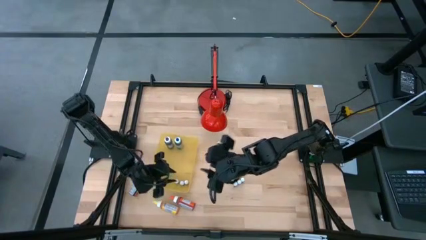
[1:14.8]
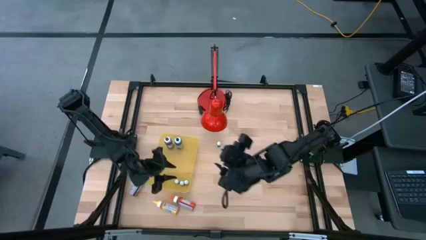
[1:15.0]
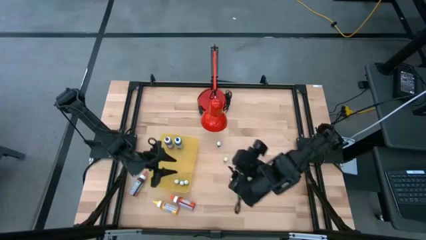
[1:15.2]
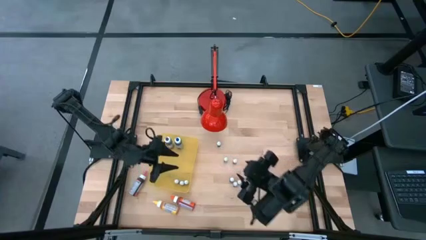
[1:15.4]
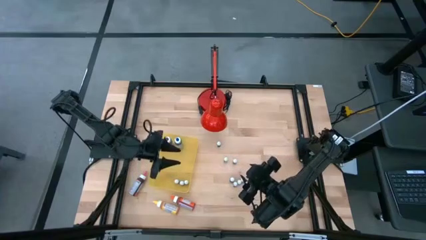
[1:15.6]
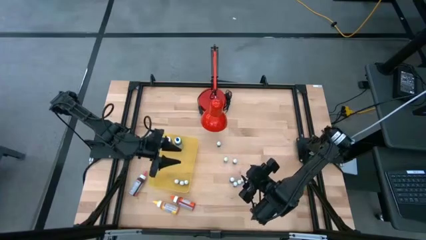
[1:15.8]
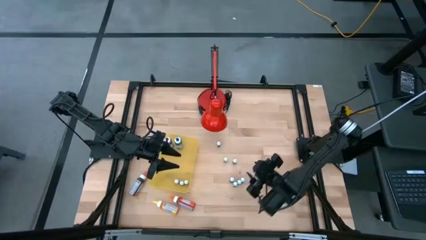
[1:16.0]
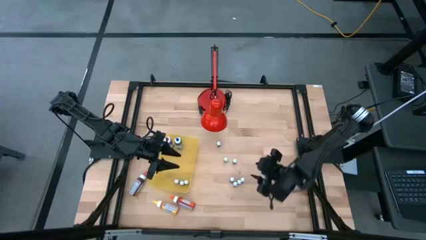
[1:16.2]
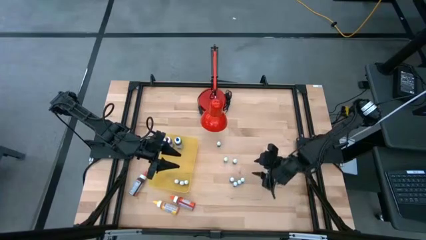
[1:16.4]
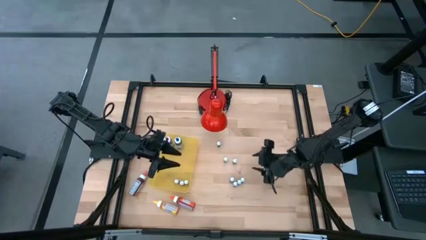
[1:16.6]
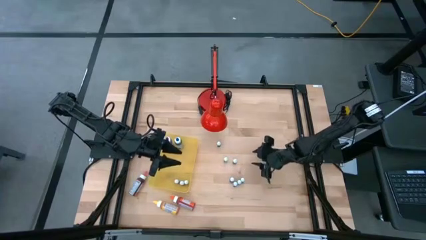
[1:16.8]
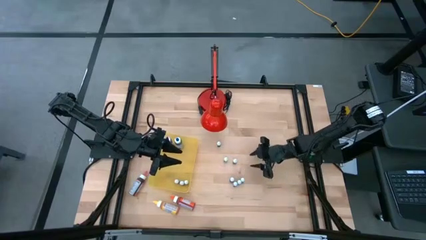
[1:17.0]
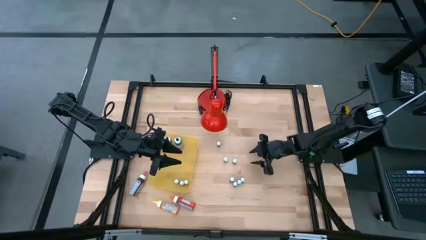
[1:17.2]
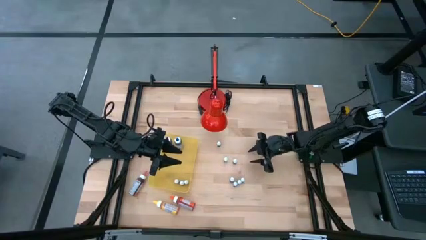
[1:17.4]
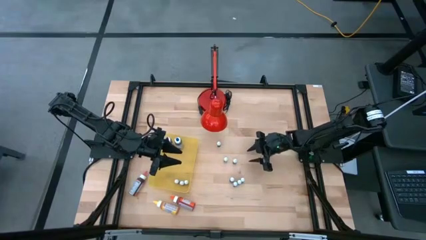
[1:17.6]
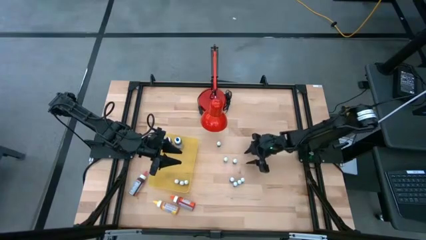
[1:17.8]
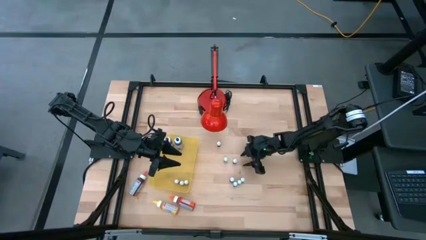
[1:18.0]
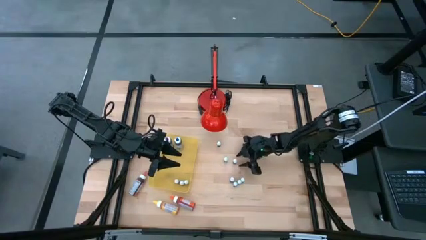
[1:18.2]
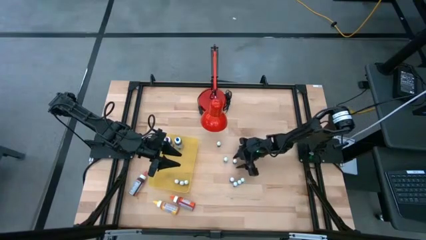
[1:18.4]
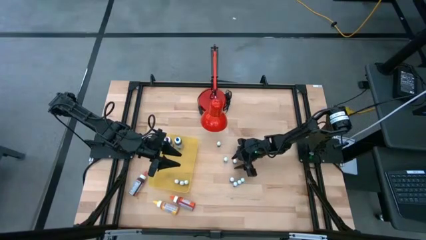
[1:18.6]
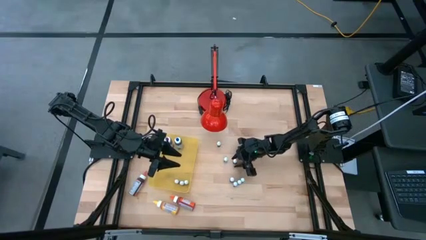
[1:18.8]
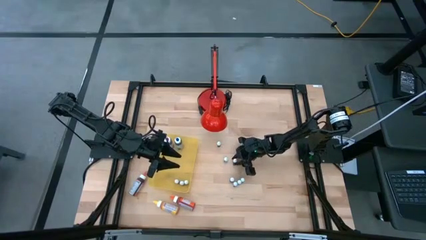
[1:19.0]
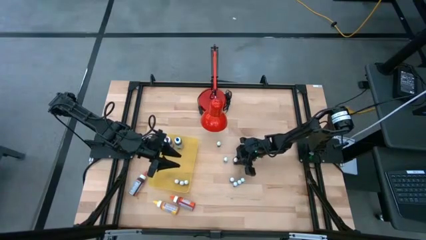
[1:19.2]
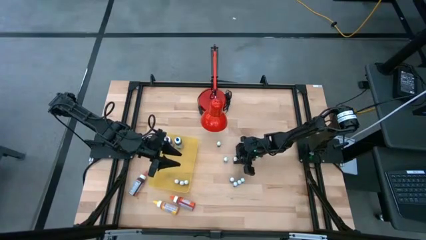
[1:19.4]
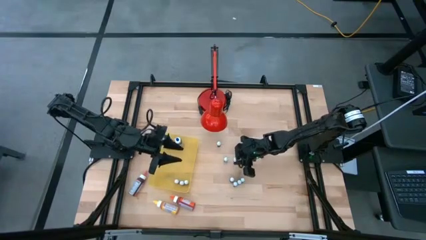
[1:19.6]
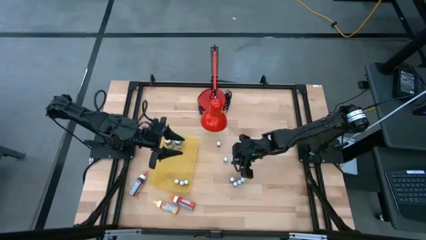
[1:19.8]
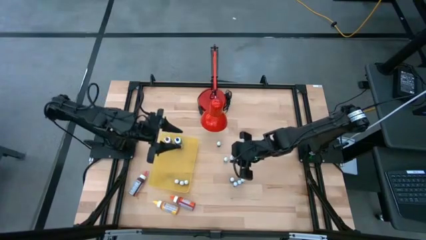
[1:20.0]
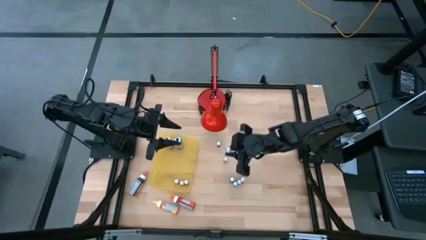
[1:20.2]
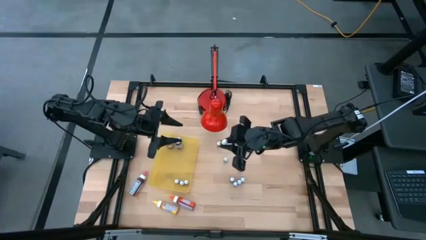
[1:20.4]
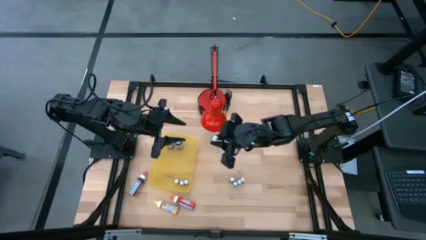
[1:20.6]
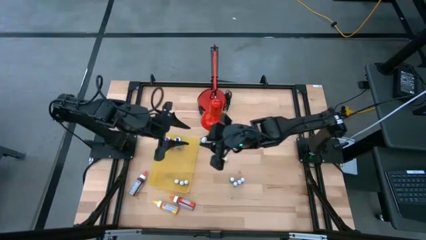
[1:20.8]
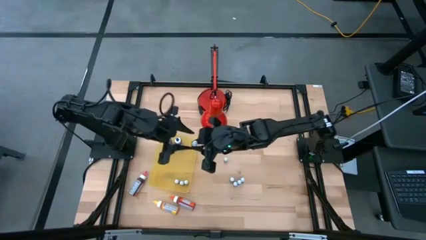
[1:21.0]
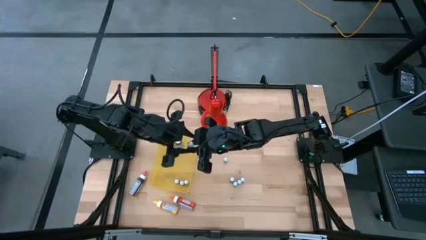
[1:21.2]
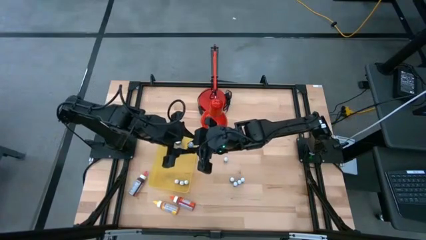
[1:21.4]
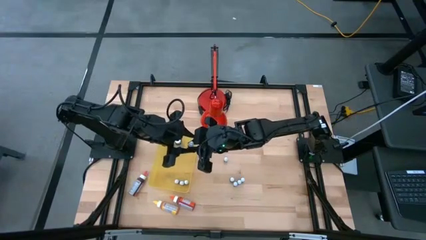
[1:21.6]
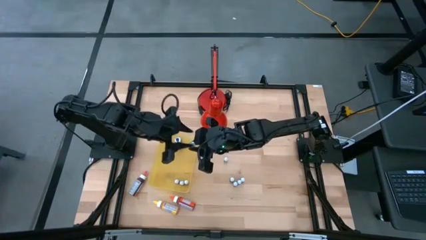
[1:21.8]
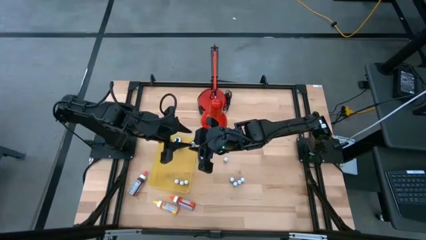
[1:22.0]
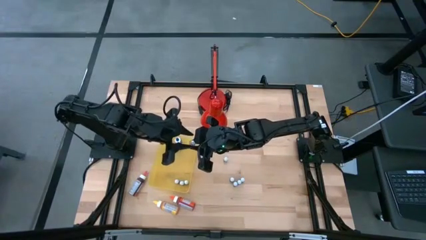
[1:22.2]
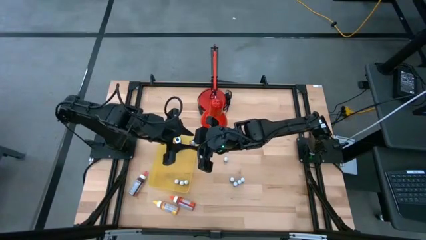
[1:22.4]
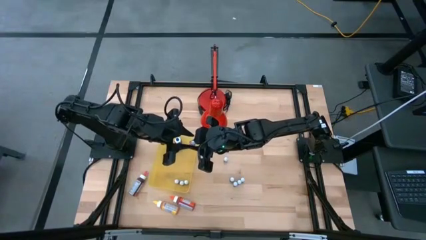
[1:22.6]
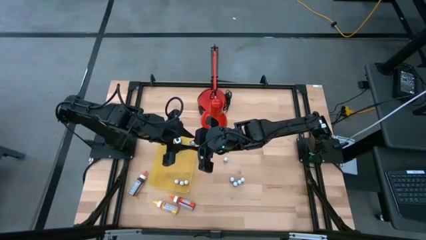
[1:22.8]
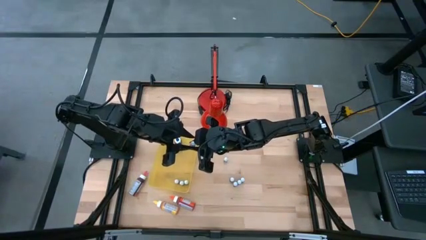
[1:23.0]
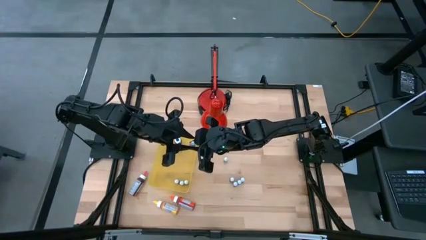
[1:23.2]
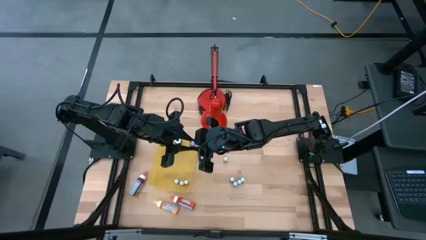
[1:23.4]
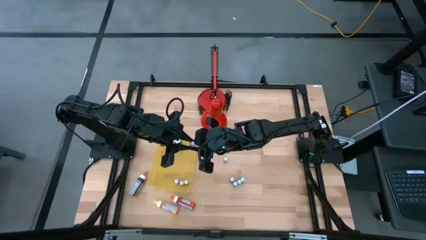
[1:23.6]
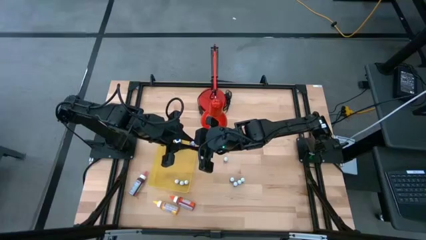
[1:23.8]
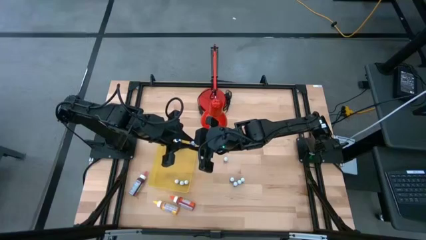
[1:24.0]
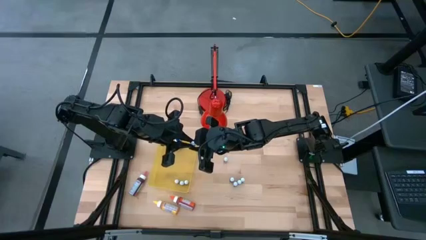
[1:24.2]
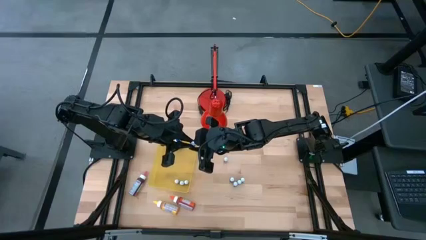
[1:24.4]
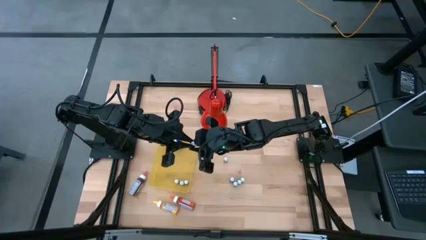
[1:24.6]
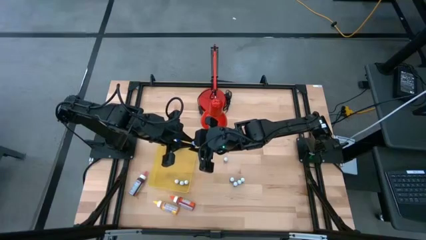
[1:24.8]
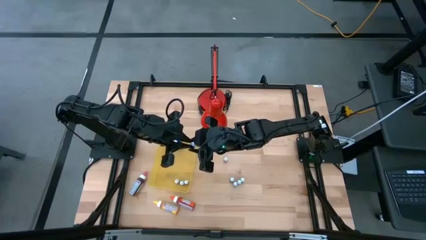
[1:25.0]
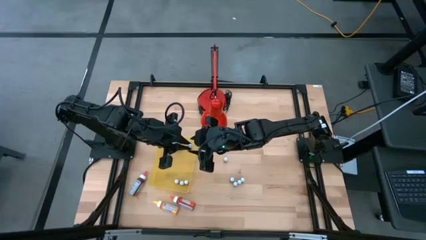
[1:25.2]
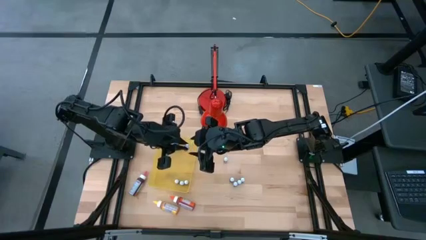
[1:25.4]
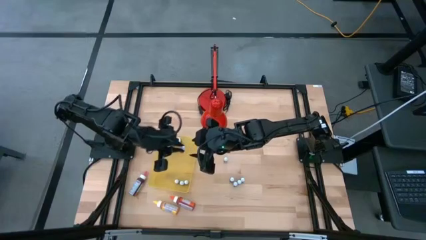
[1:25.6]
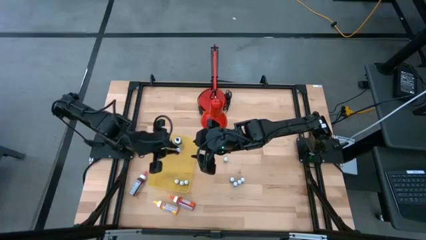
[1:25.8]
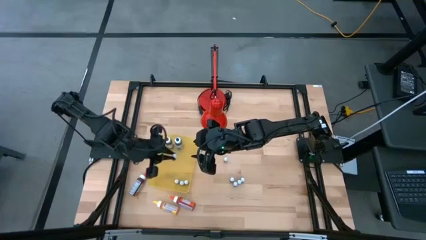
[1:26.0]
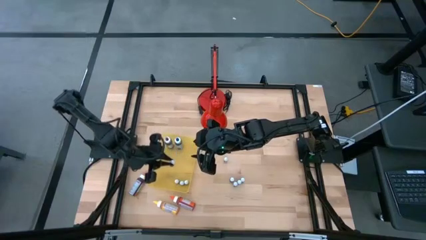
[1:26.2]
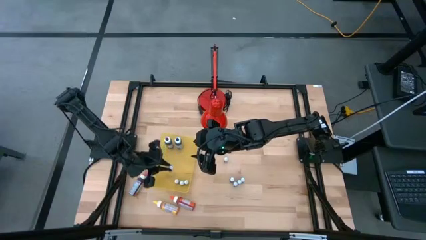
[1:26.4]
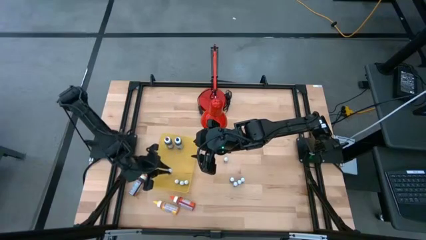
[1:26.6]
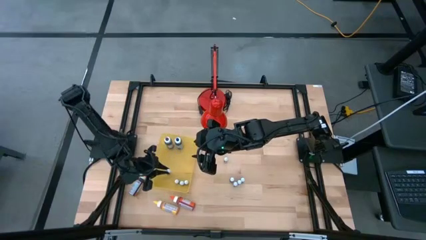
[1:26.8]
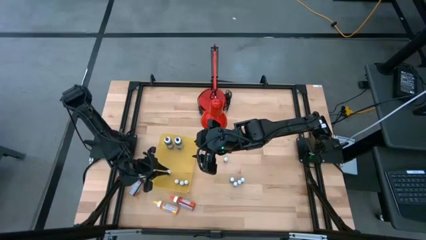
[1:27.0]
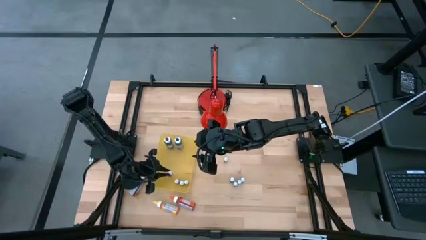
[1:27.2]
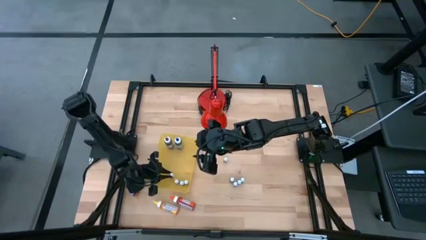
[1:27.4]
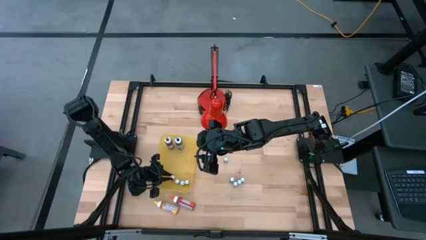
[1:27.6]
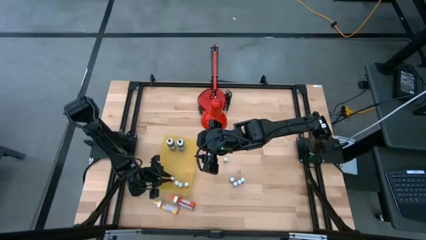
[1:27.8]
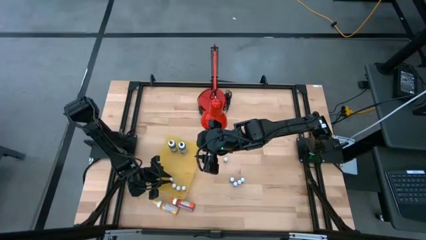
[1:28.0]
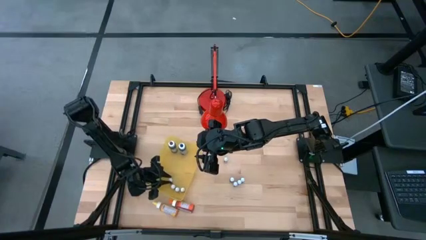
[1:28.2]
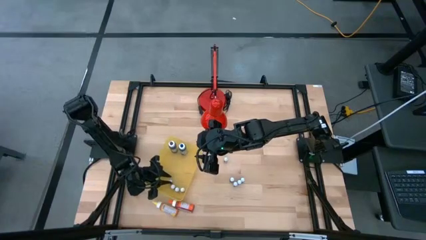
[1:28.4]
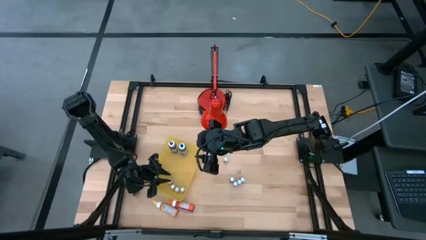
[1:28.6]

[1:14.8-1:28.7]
Task: Pick & Place food coloring
Put the small pink food coloring bottle into the yellow bin
